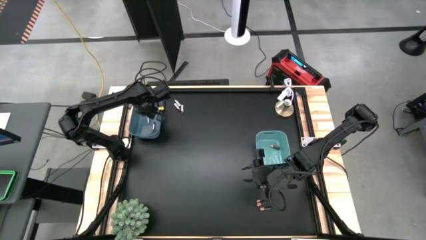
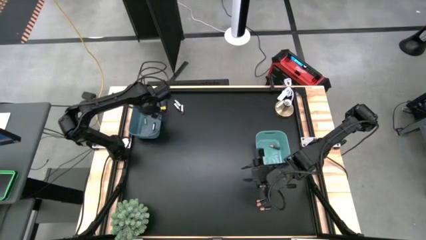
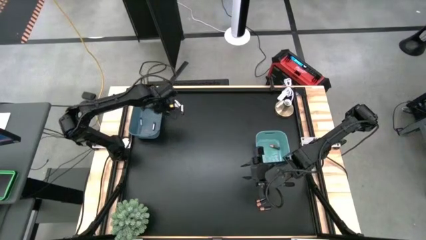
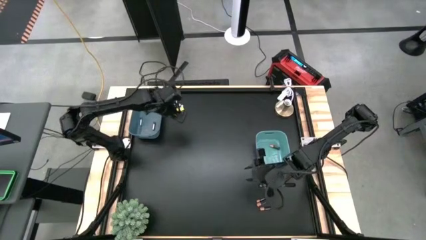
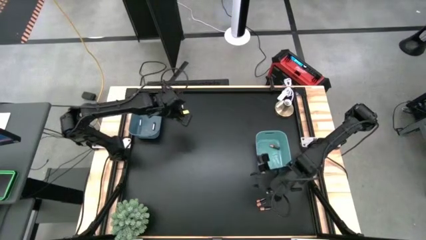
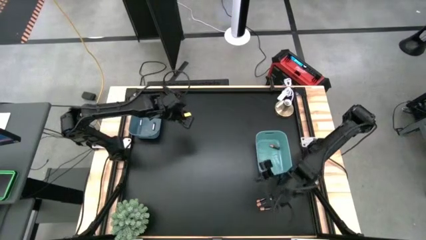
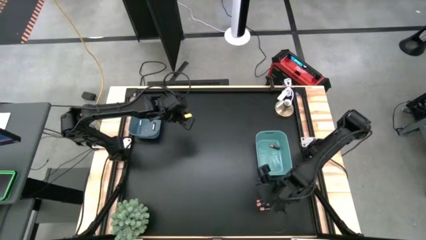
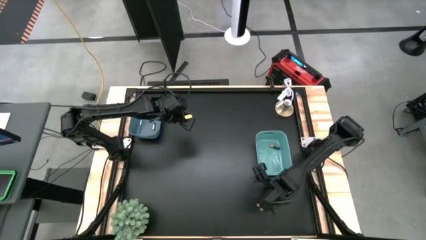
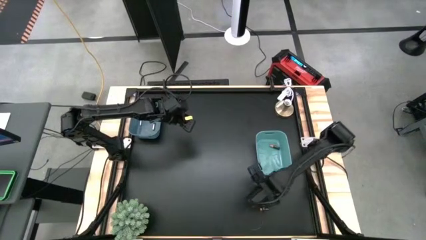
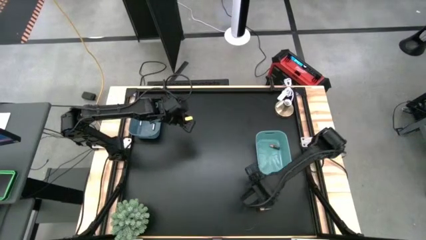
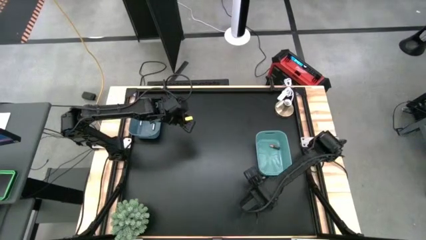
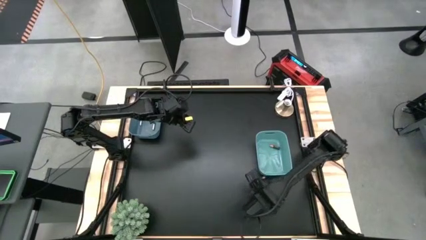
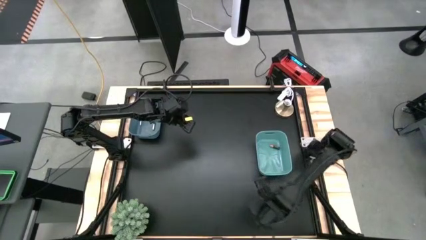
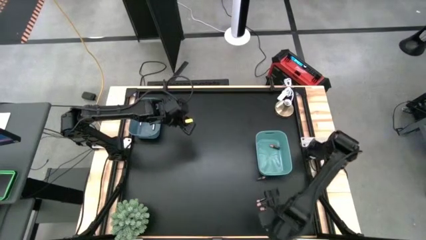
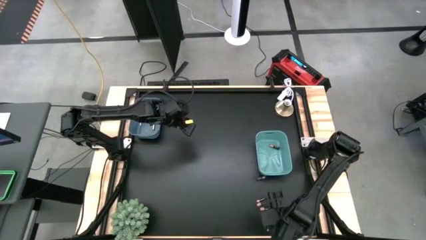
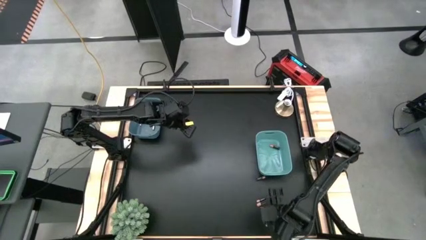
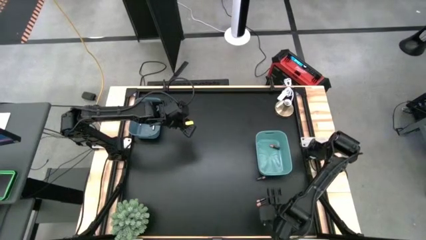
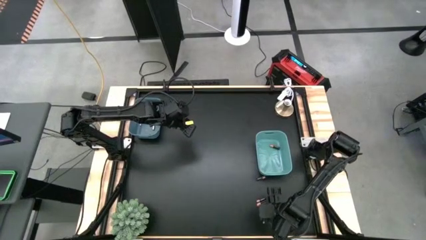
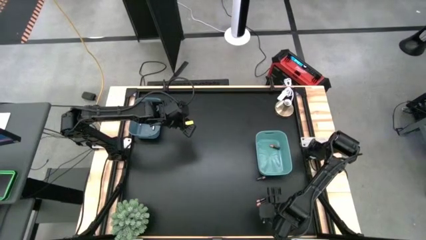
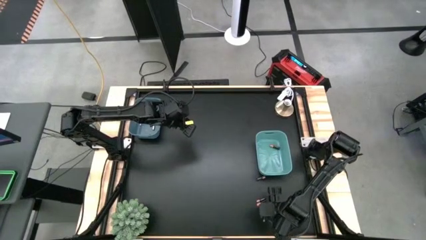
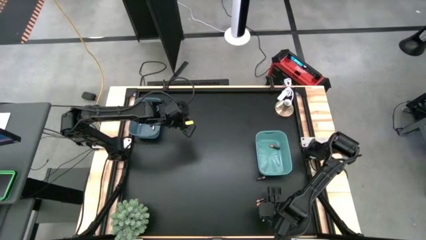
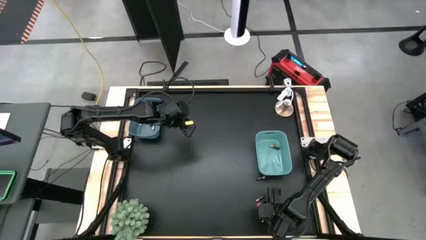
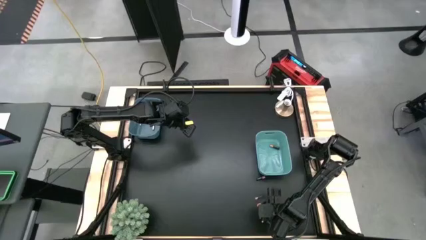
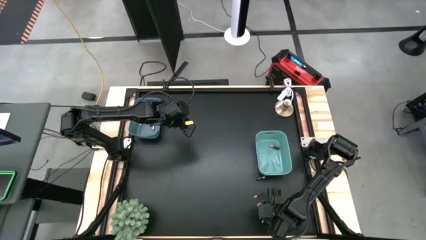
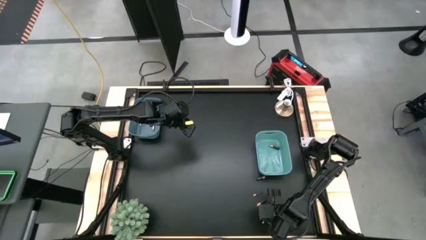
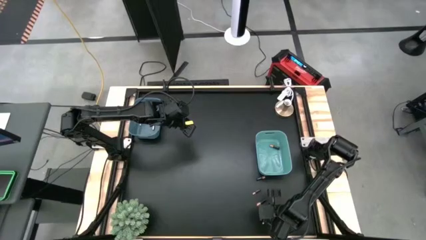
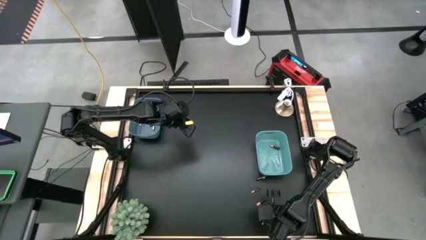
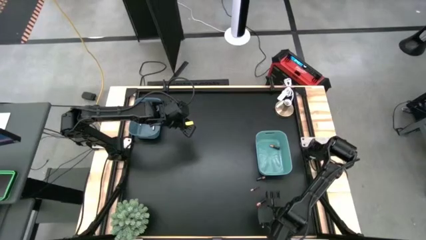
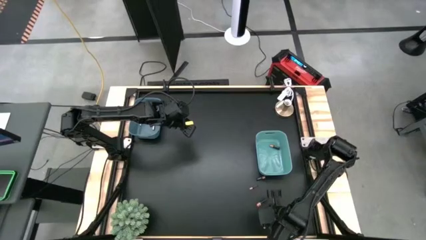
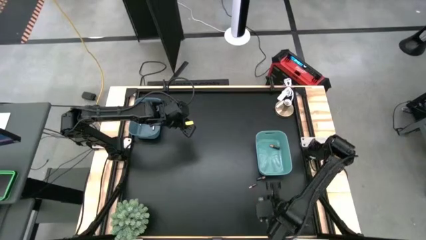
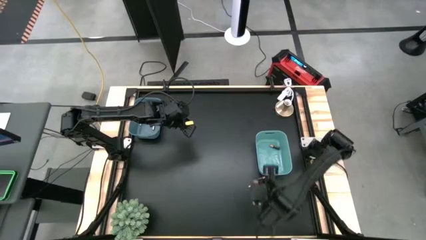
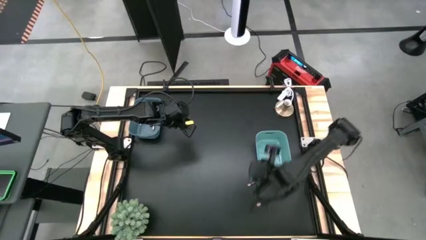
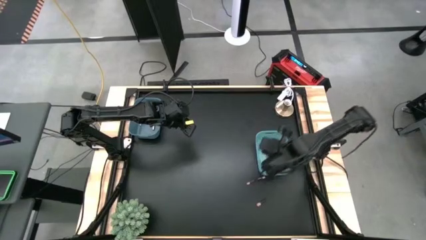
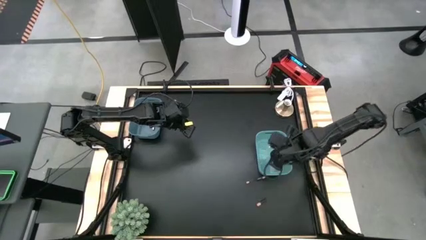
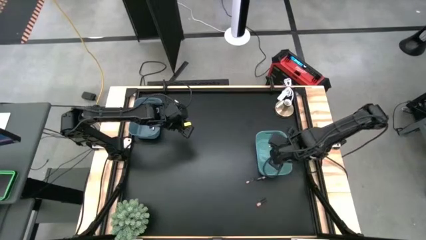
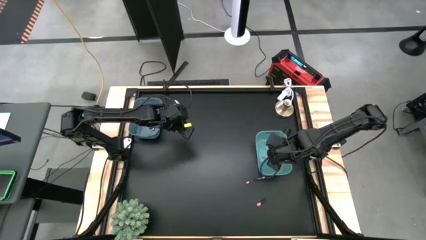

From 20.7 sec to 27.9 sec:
Task: Sort batteries
Put the brown battery into the green bin

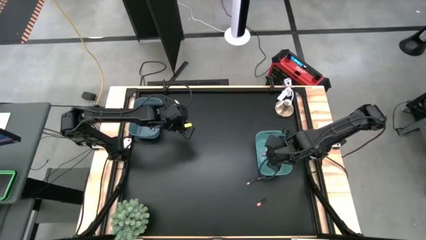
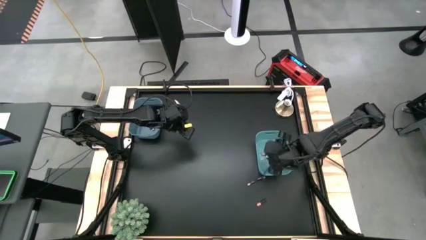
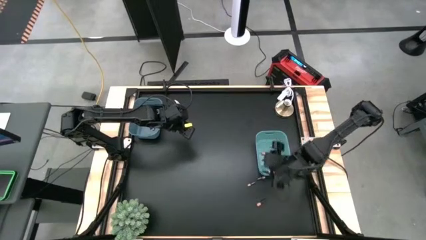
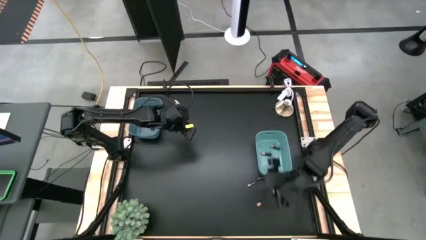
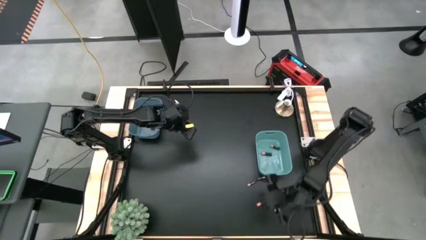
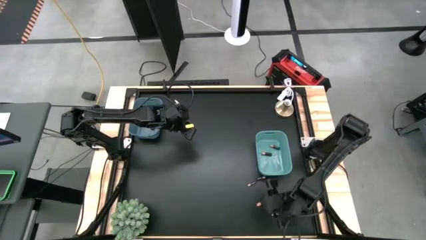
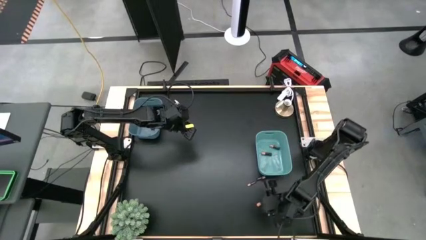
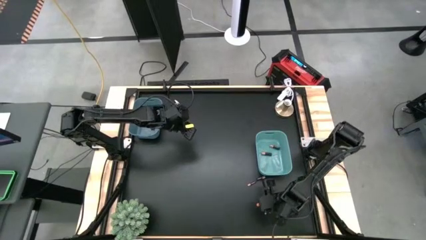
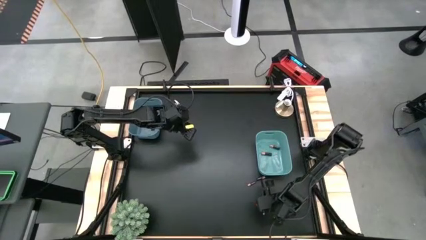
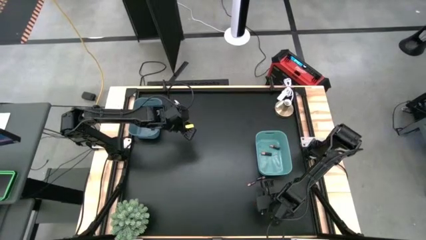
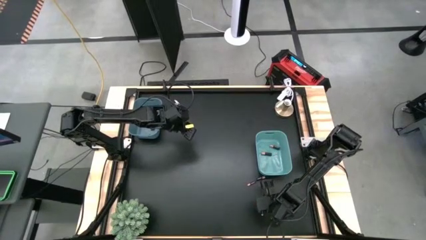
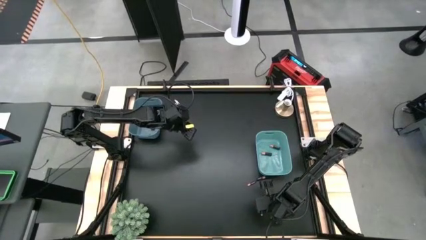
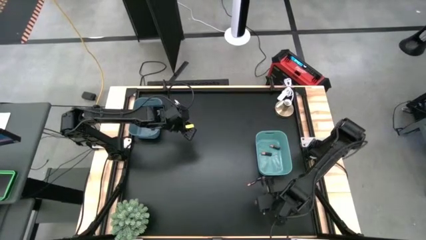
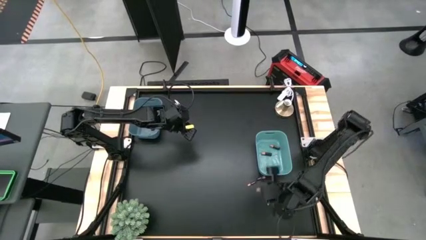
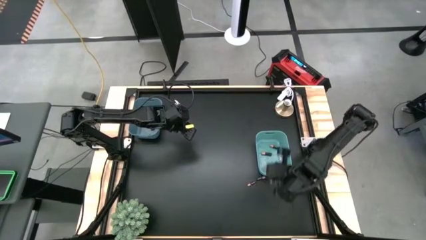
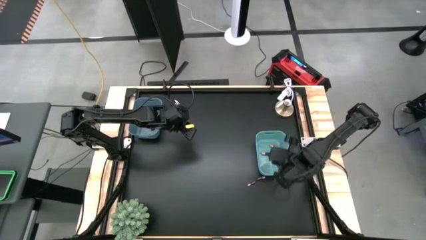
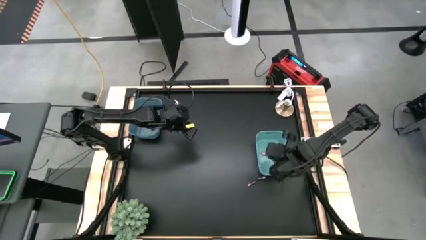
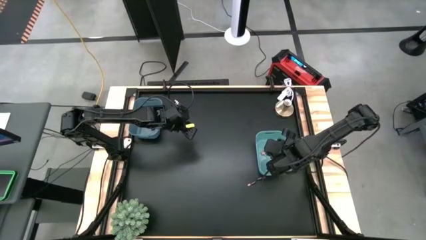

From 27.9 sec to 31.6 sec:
Put the brown battery into the green bin

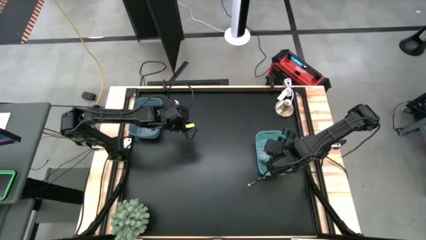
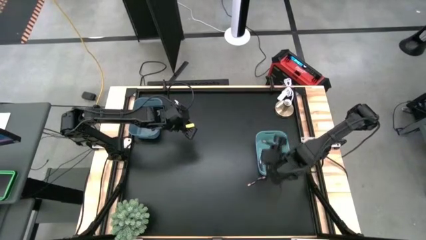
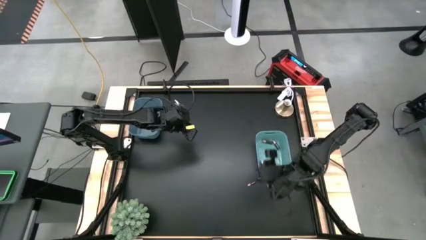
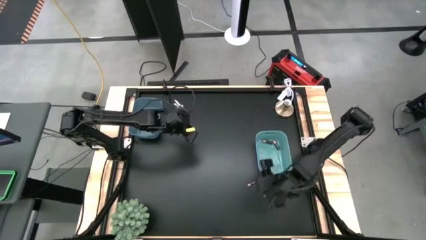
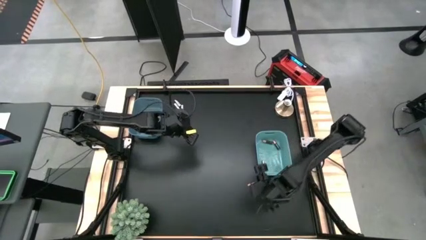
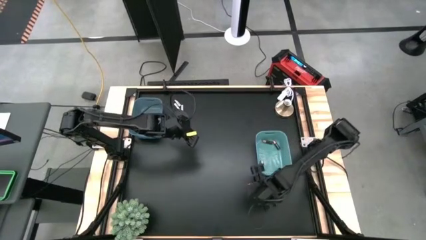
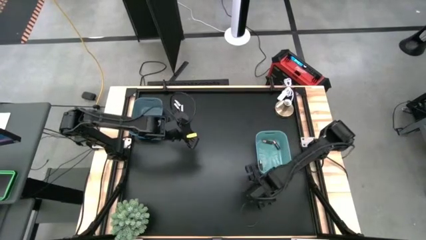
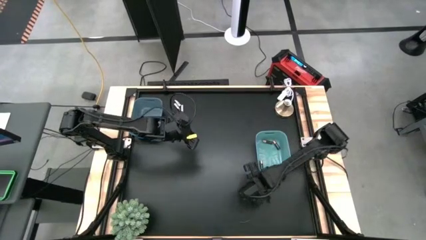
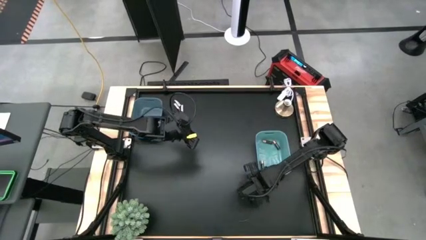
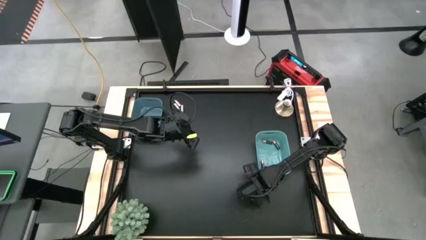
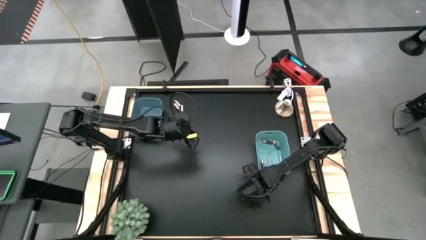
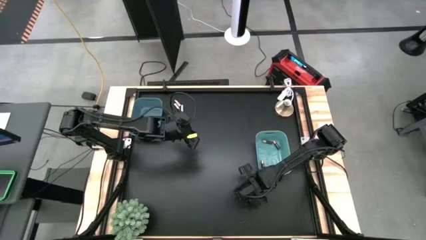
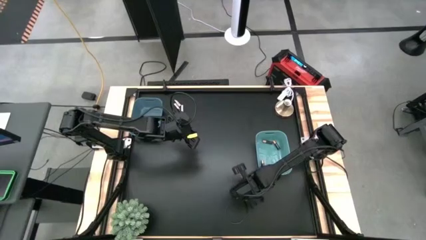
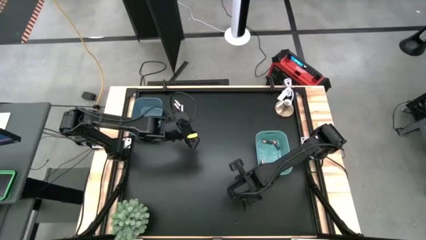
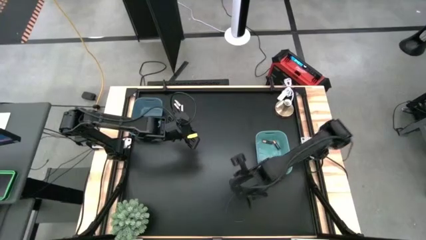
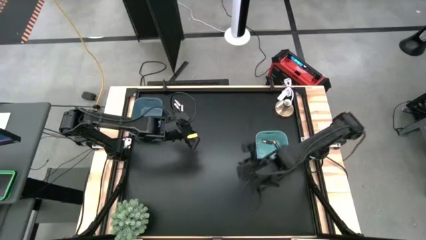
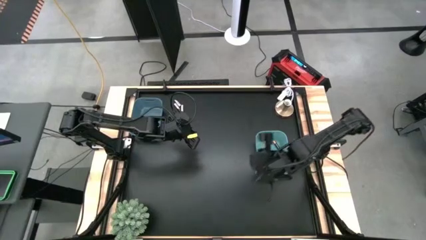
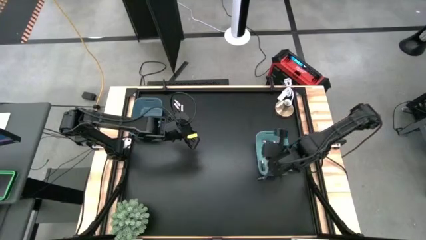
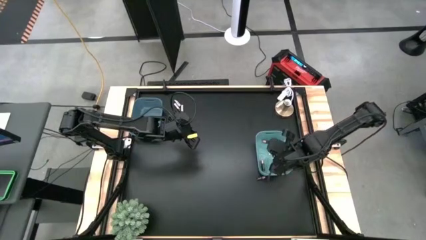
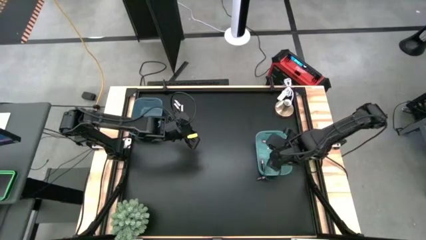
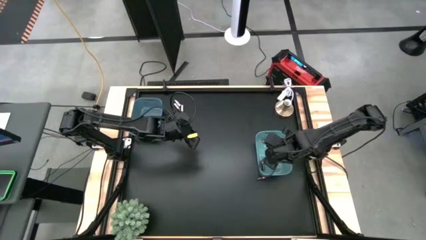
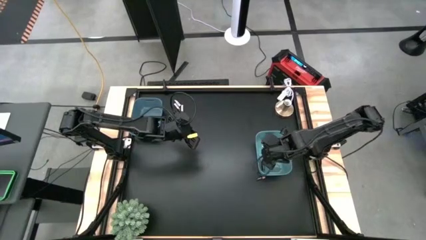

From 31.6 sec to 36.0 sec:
Put the brown battery into the green bin

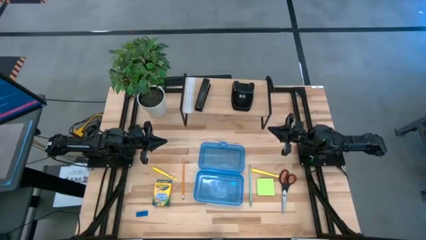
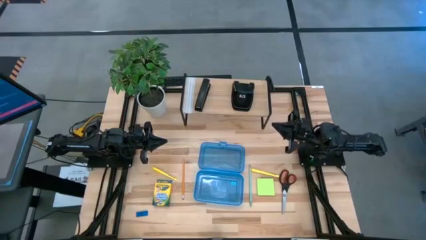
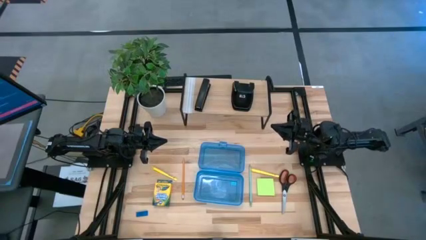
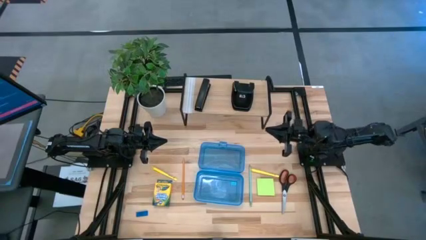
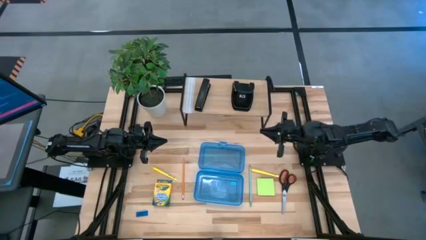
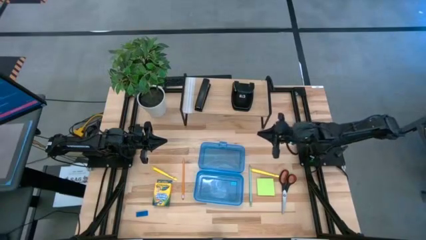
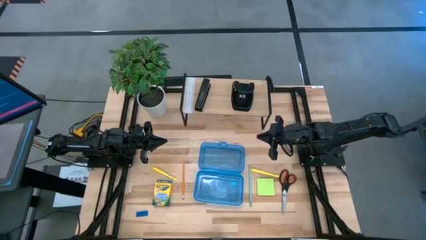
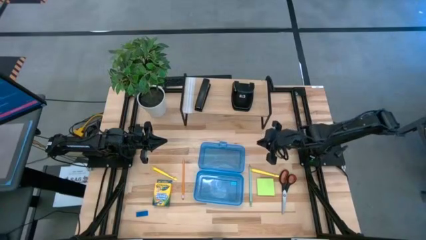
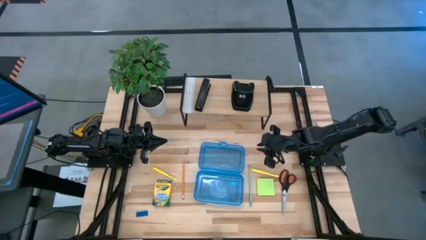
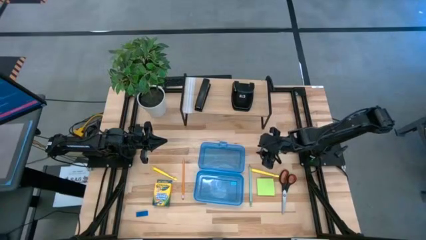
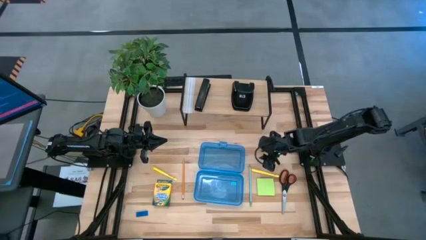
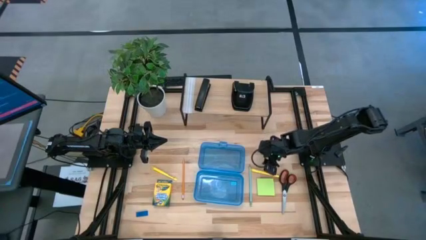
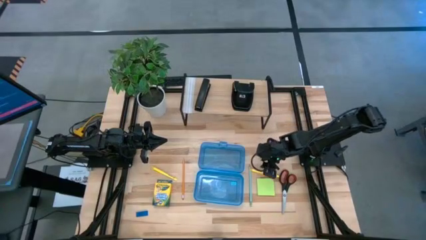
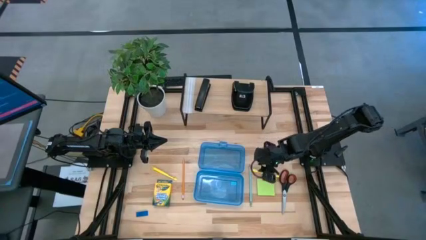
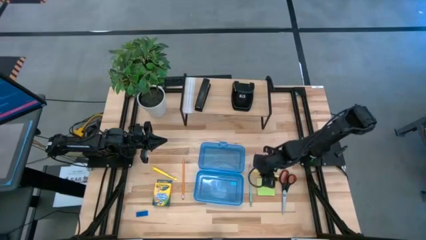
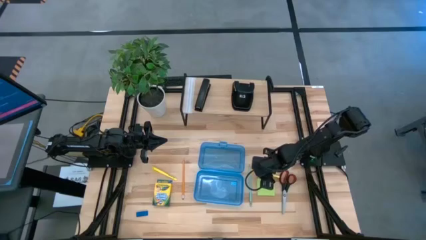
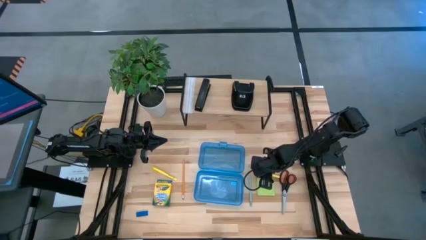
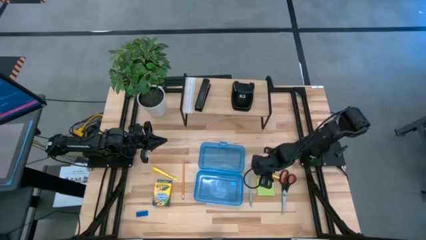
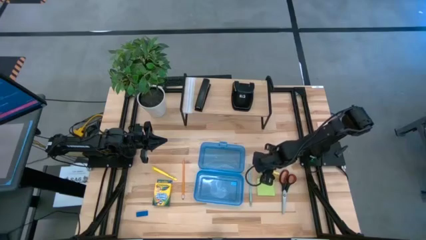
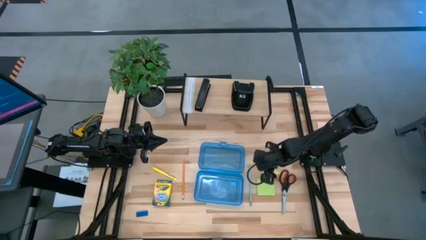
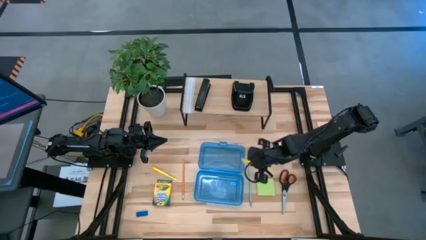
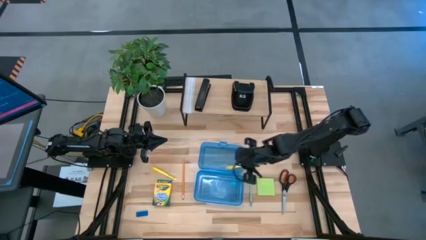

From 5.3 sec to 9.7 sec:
Task: Pack school essentials
Put the right yellow pen into the blue supply box
